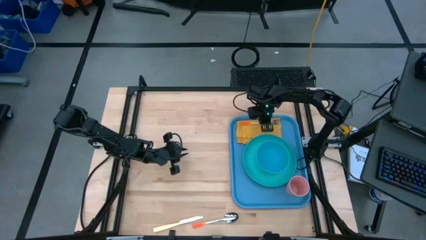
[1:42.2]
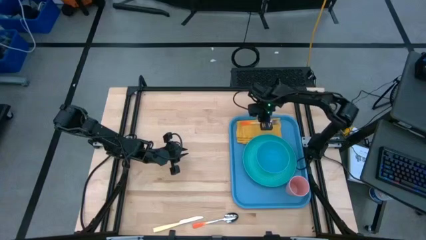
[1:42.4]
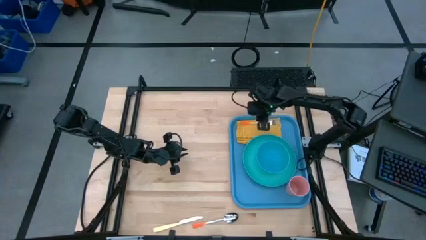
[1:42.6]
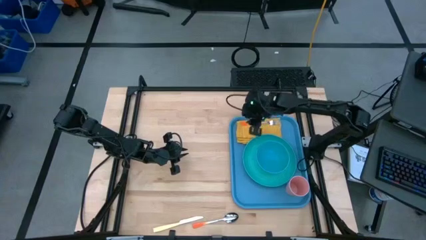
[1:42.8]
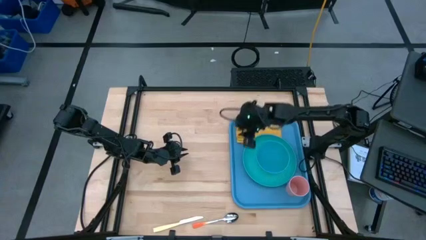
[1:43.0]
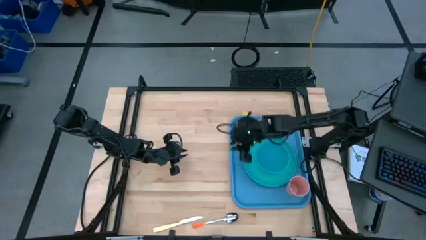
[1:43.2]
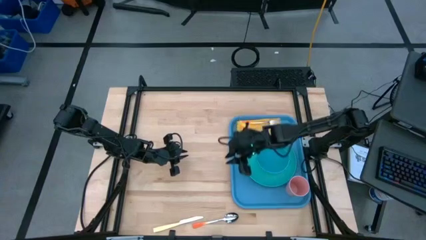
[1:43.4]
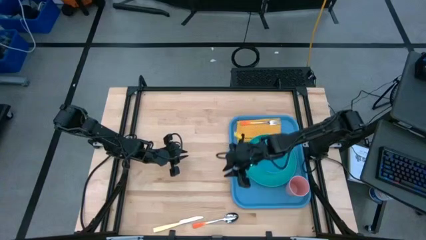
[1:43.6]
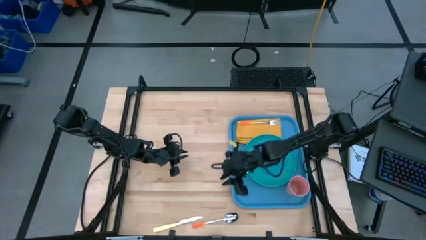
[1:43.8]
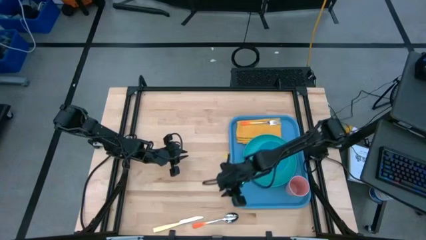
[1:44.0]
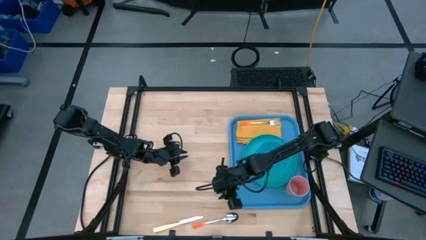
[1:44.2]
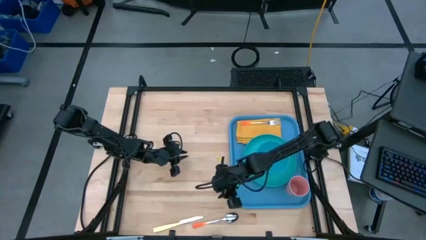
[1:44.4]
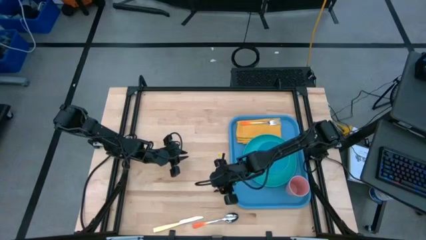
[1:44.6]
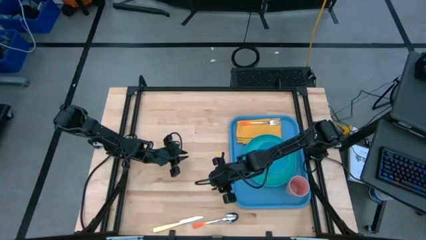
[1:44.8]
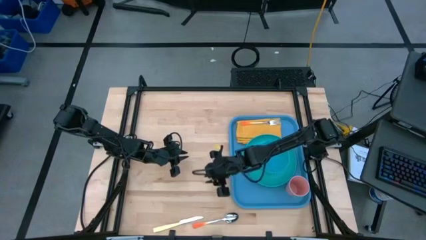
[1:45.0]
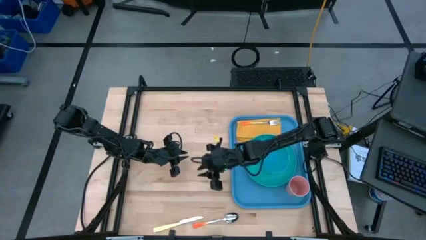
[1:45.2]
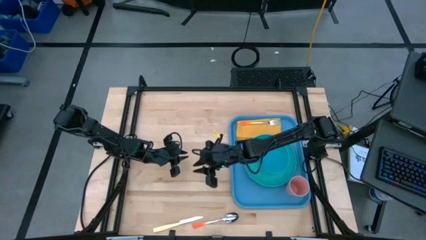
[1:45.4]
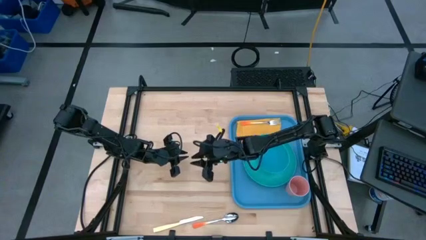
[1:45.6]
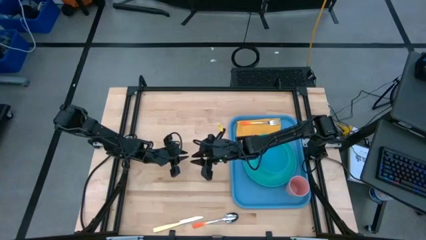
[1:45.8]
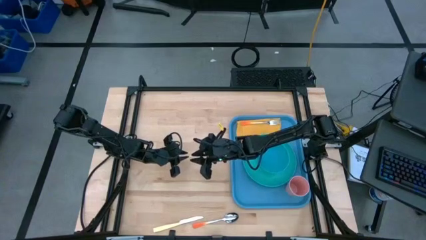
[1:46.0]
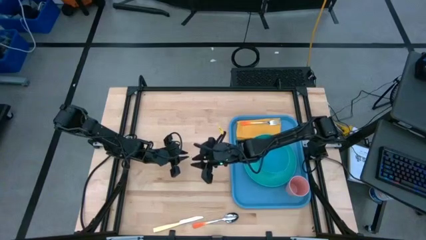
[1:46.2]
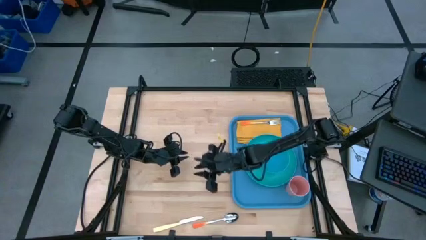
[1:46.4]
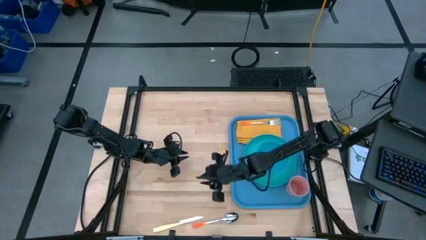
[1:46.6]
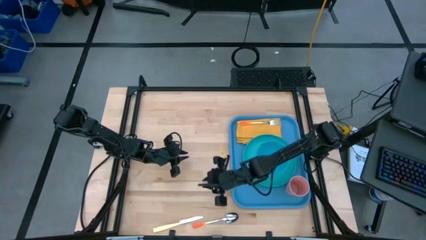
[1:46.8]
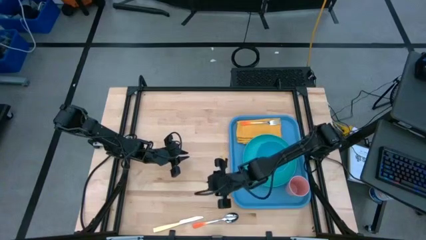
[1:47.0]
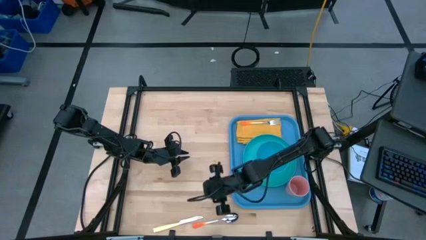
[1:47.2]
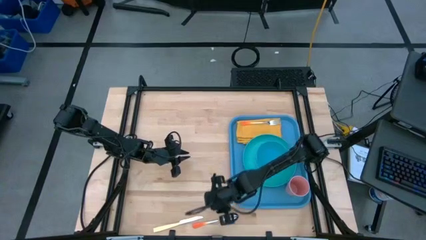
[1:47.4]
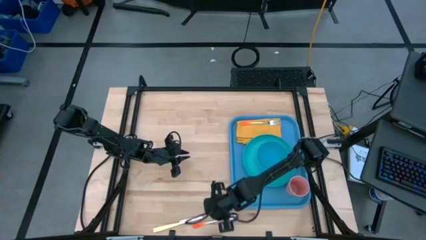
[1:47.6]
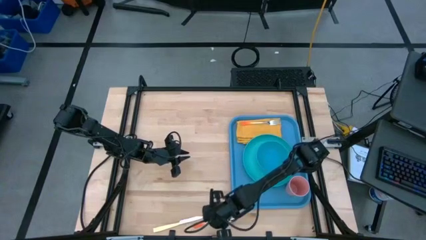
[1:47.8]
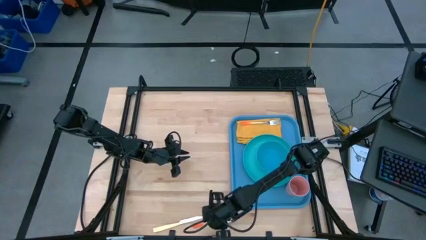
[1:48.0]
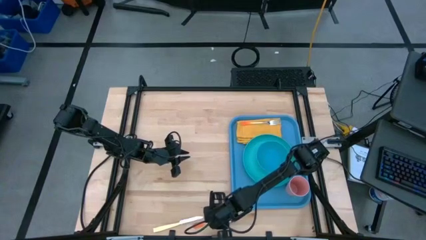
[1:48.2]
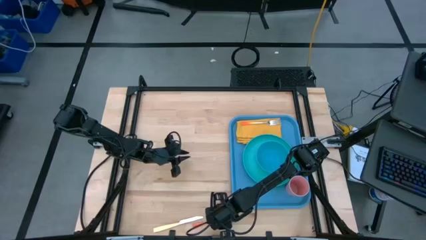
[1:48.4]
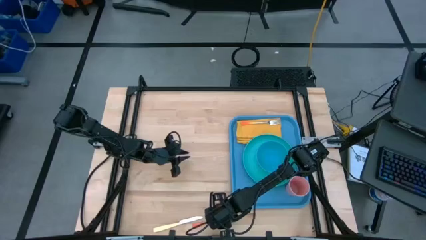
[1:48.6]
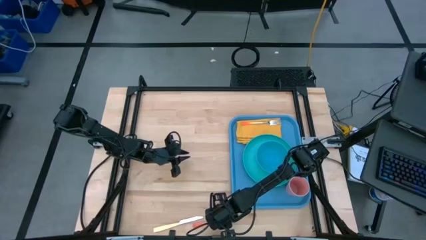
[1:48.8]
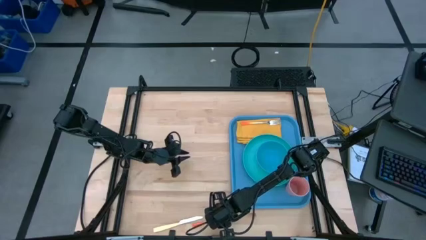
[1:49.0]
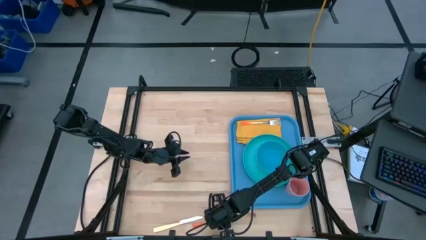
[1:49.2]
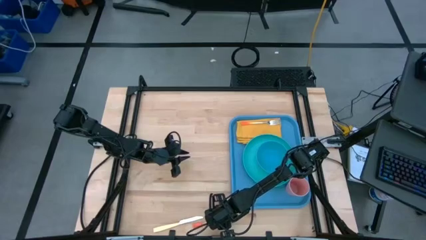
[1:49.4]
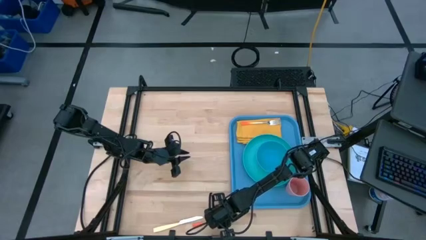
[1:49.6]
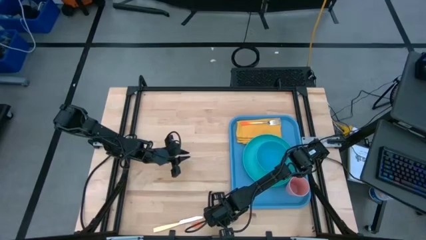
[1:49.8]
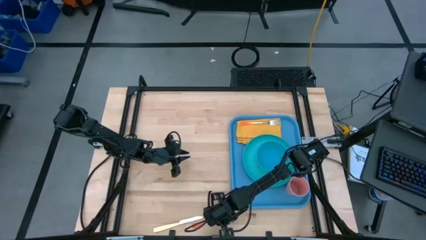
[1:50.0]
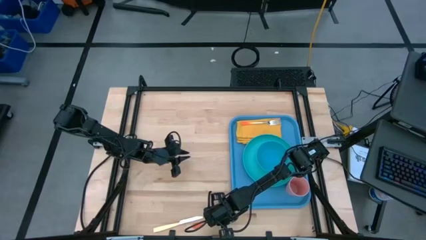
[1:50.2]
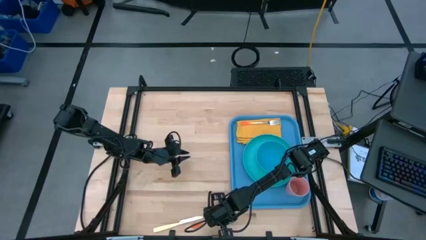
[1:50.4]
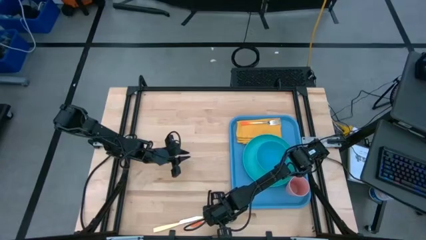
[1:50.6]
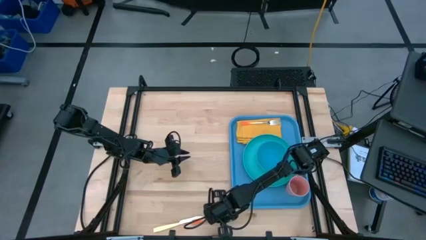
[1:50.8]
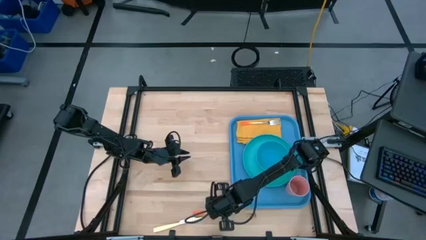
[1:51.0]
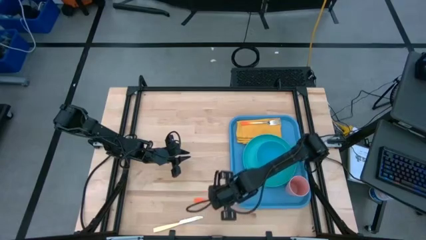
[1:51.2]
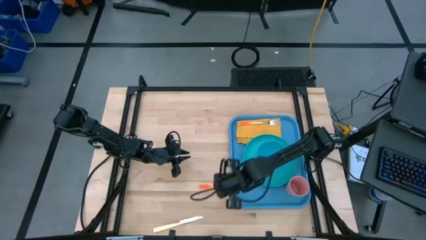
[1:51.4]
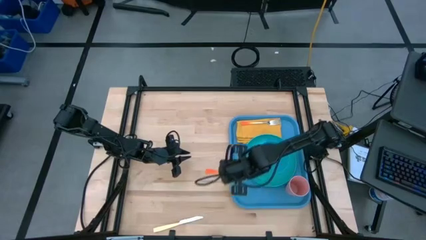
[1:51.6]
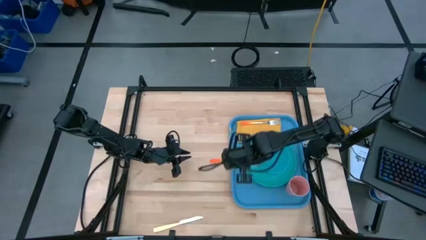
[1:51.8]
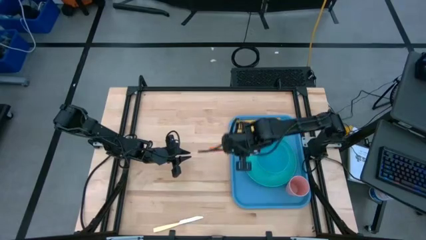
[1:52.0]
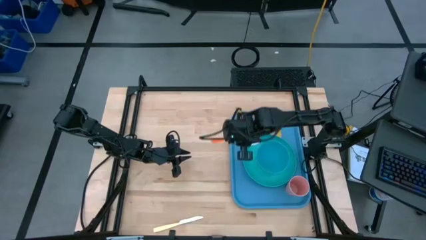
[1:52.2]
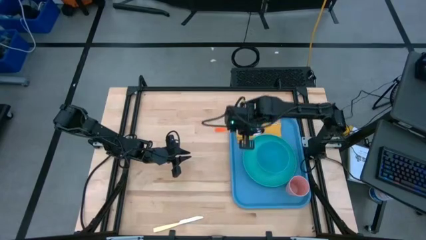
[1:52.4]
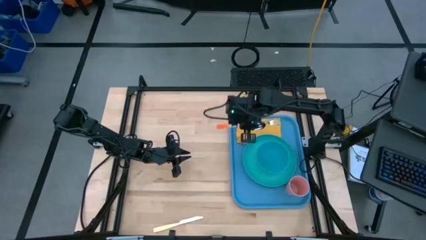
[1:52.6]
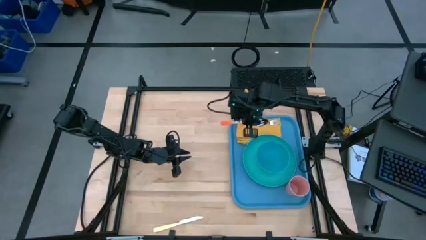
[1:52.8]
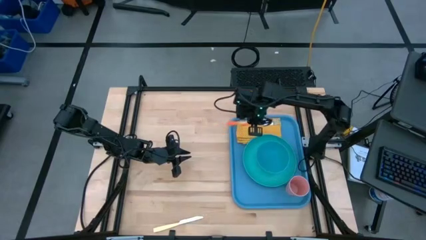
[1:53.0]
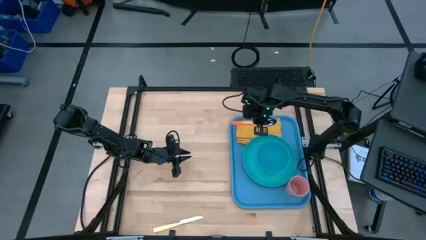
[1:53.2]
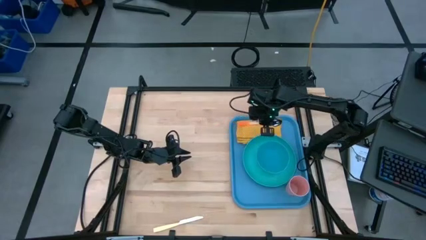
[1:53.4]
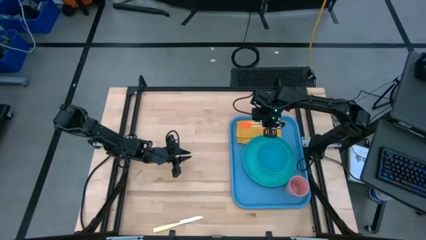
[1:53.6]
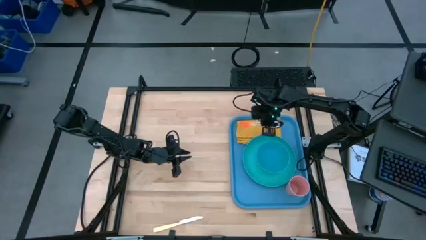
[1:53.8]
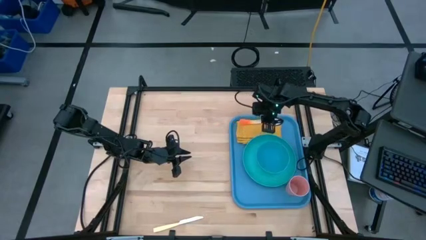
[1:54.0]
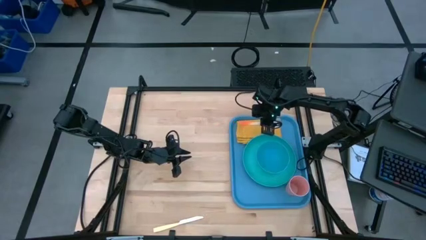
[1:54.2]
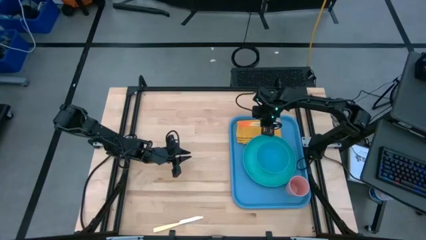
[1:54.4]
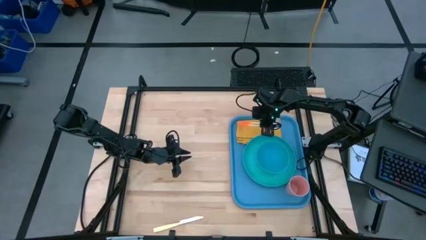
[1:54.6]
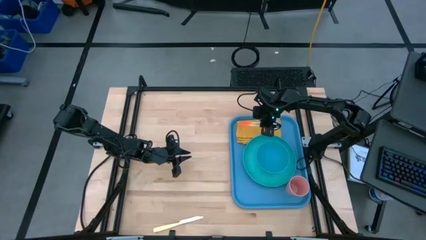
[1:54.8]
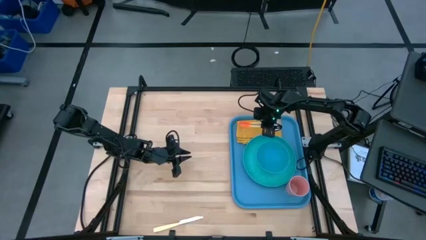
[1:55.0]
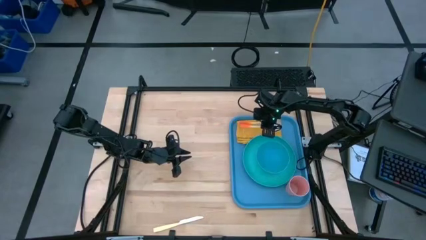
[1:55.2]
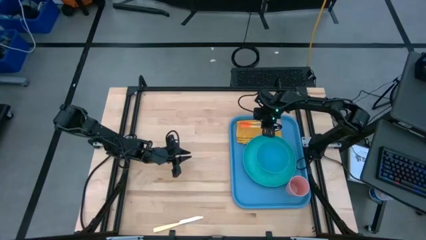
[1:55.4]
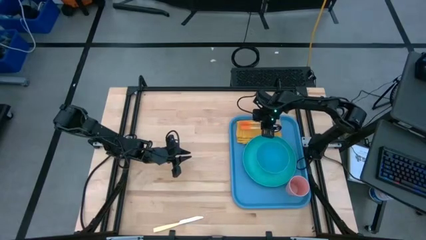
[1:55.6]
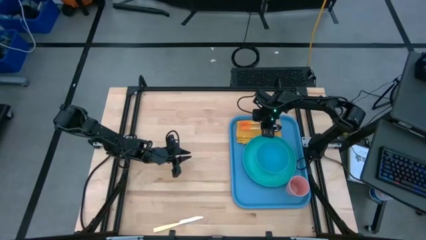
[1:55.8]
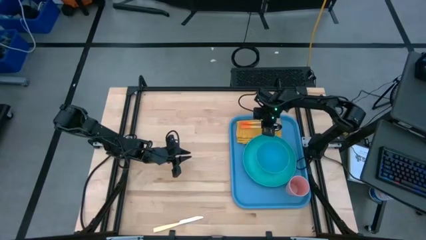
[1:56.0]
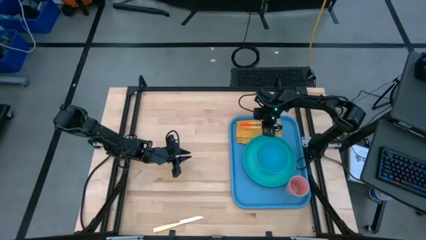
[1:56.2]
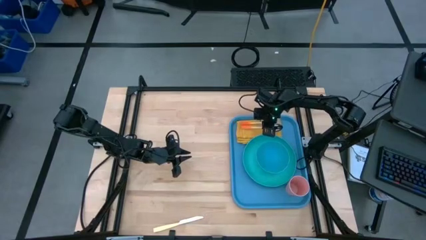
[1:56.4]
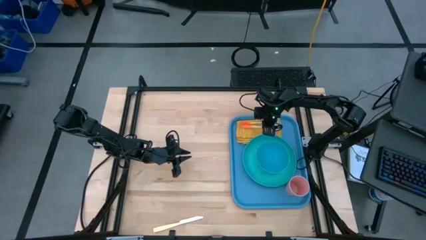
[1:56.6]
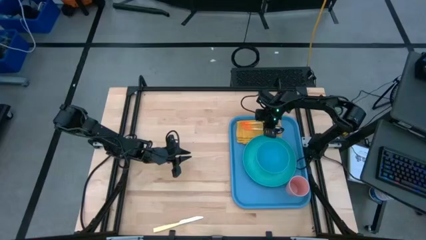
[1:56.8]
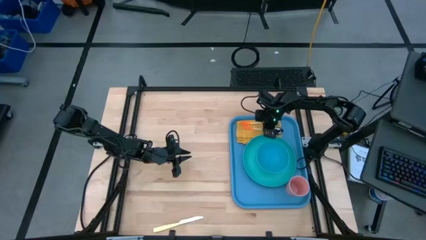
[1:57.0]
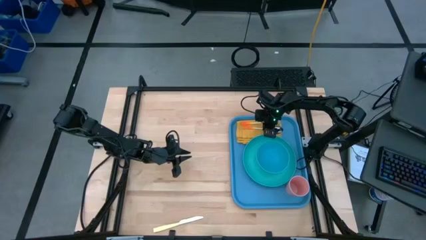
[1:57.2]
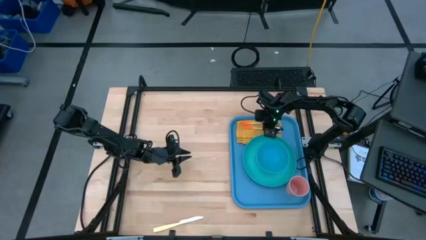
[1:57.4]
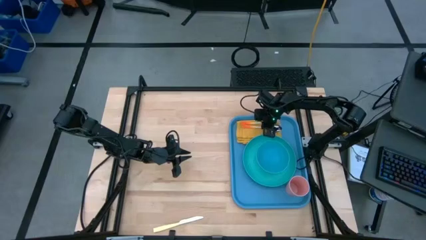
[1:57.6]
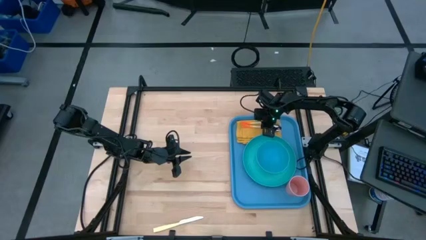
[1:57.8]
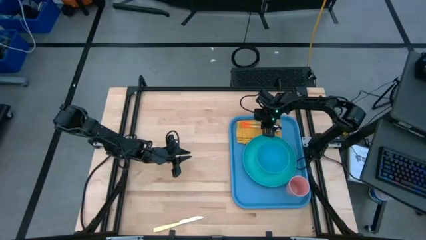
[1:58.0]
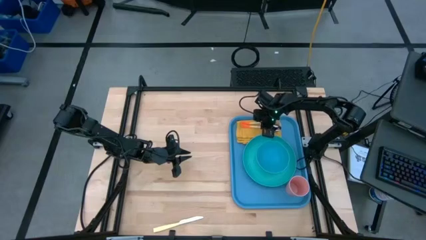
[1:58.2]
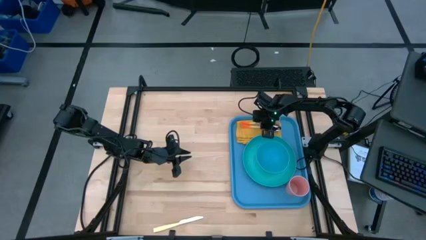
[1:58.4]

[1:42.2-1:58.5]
Task: Set up tray
Put the orange spoon on the napkin to the left of the blue plate
